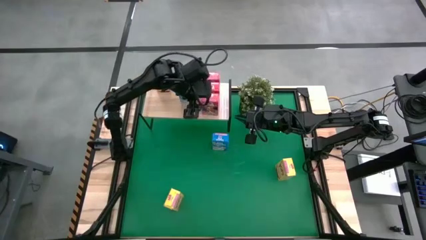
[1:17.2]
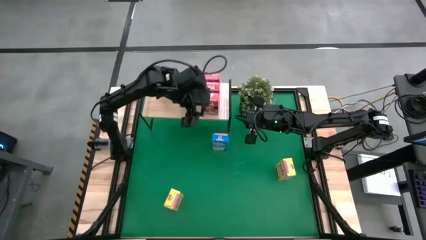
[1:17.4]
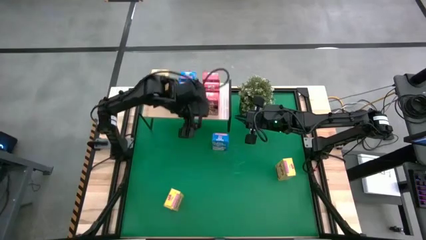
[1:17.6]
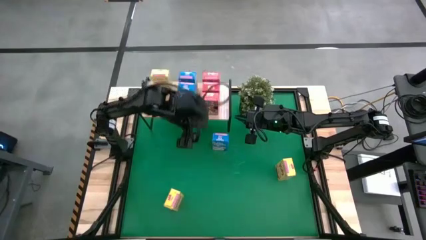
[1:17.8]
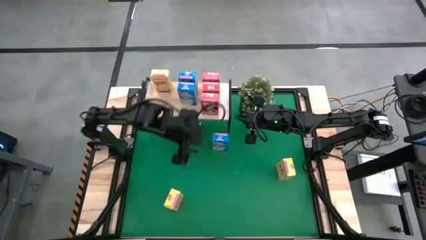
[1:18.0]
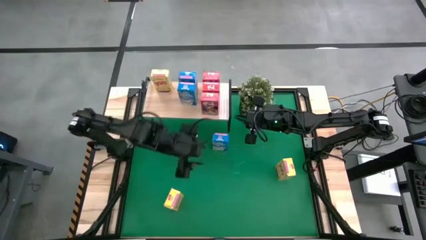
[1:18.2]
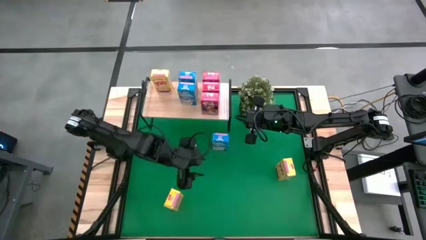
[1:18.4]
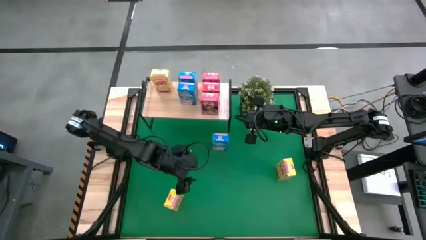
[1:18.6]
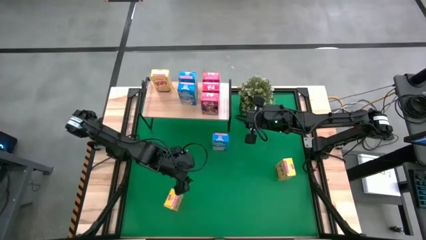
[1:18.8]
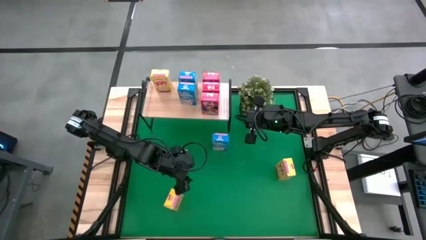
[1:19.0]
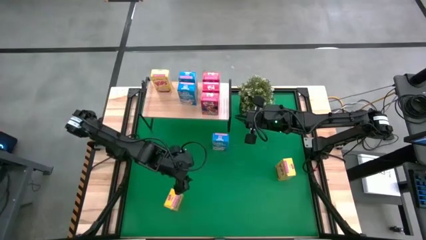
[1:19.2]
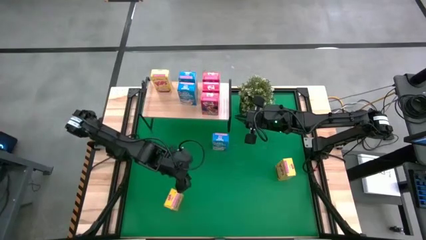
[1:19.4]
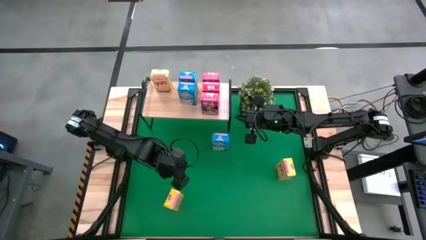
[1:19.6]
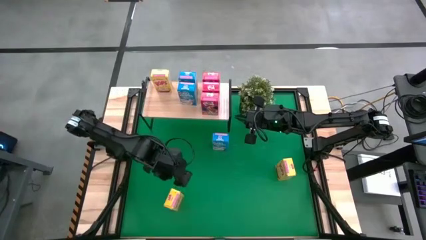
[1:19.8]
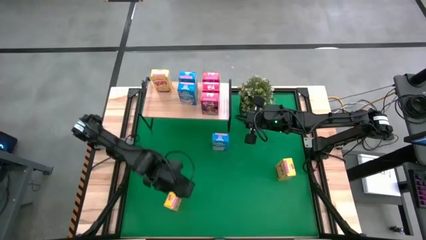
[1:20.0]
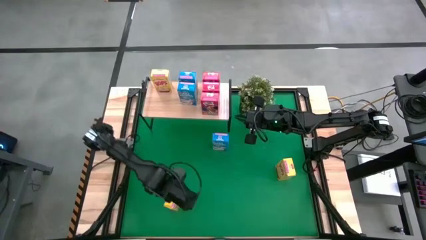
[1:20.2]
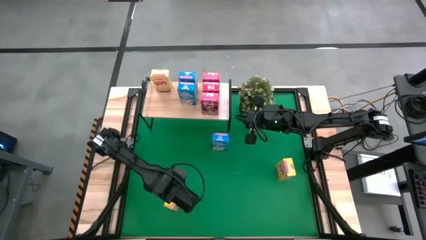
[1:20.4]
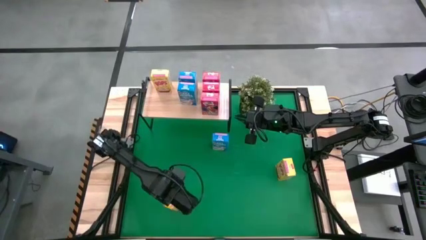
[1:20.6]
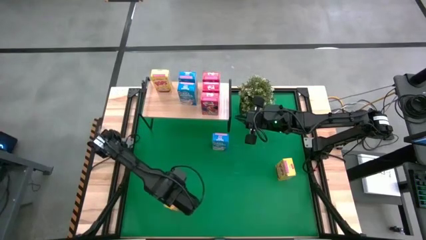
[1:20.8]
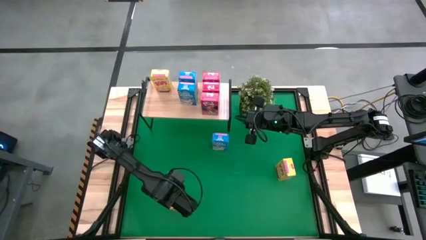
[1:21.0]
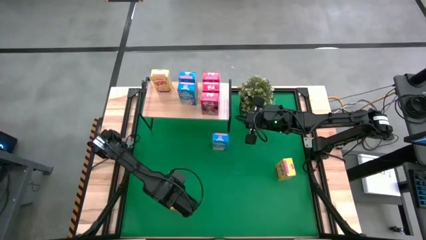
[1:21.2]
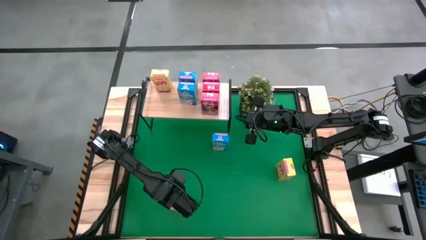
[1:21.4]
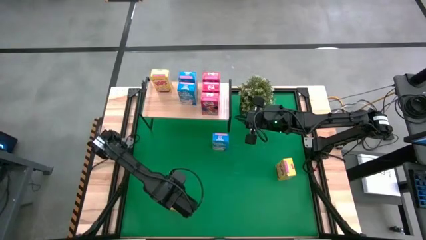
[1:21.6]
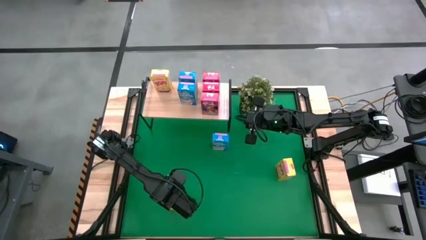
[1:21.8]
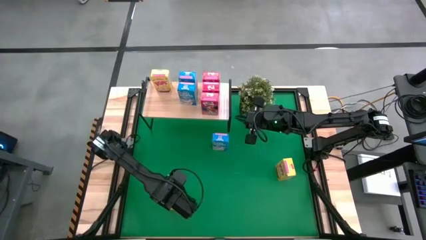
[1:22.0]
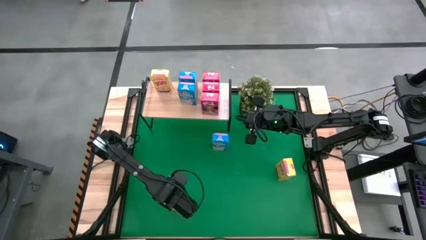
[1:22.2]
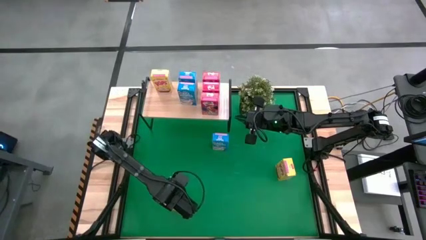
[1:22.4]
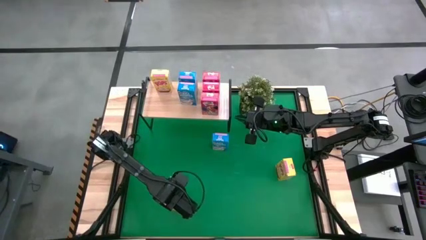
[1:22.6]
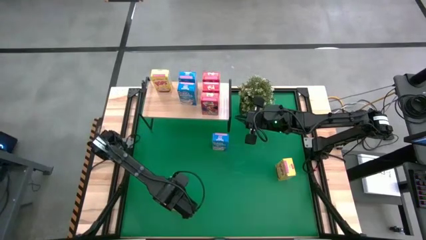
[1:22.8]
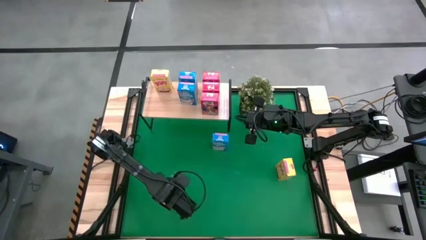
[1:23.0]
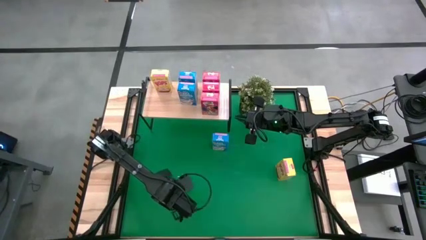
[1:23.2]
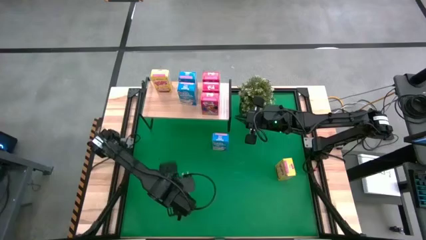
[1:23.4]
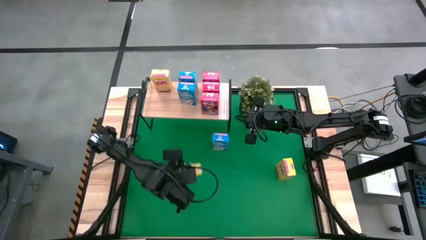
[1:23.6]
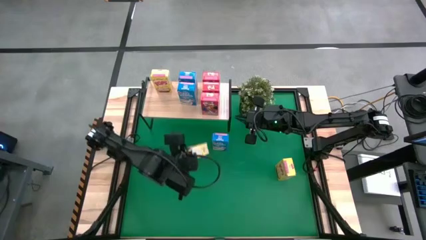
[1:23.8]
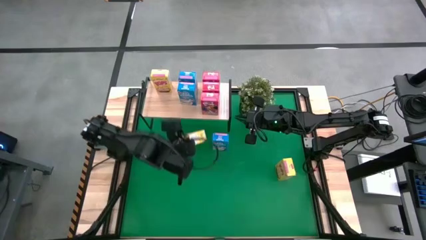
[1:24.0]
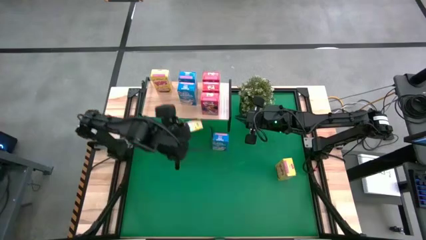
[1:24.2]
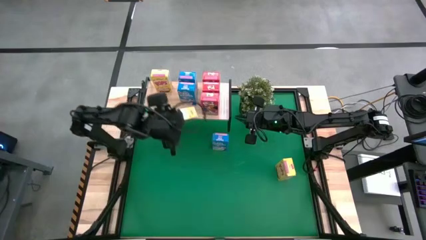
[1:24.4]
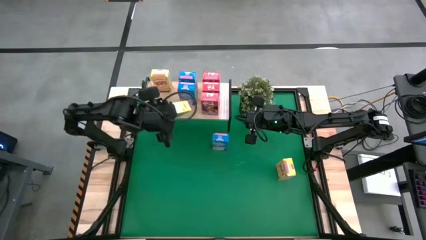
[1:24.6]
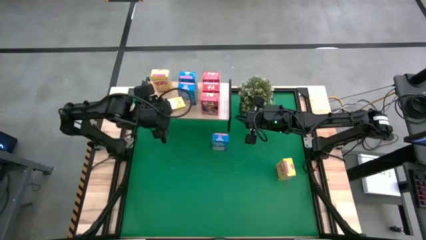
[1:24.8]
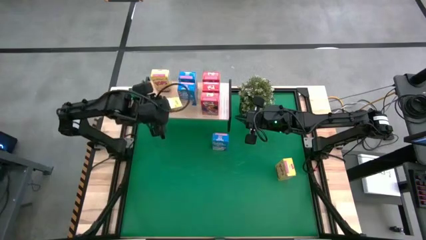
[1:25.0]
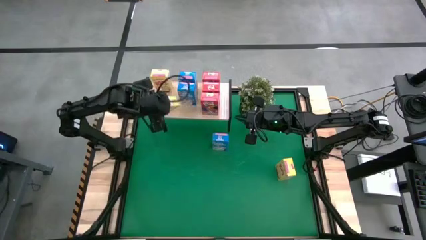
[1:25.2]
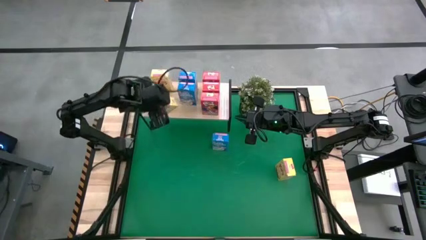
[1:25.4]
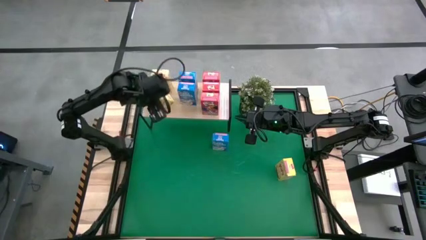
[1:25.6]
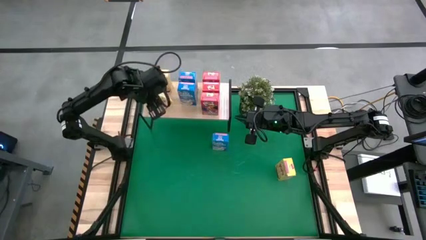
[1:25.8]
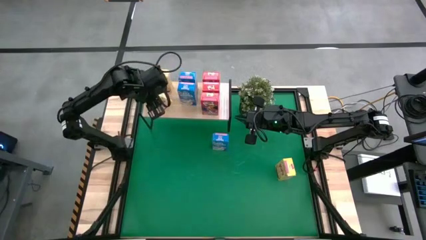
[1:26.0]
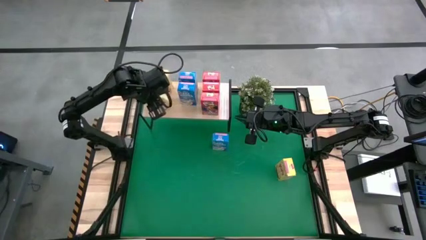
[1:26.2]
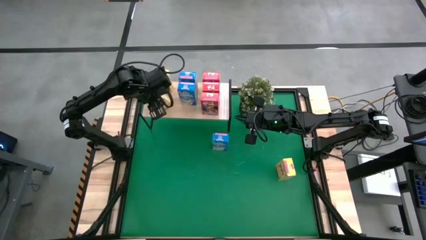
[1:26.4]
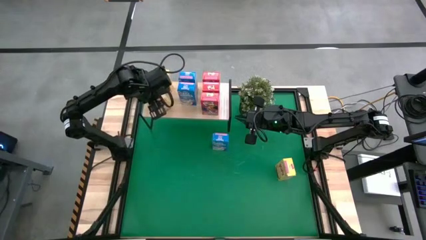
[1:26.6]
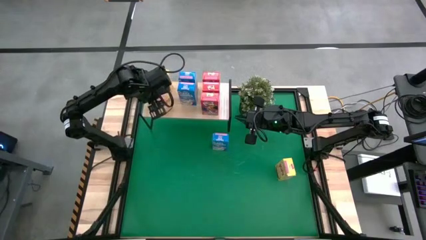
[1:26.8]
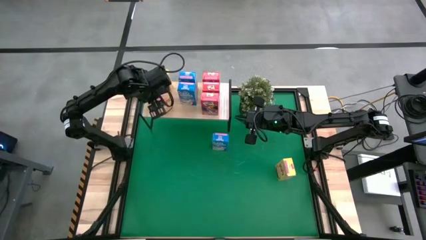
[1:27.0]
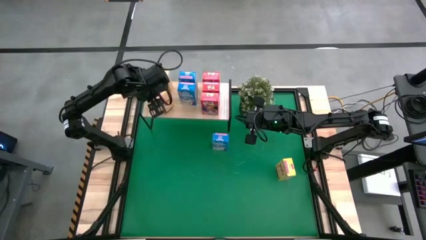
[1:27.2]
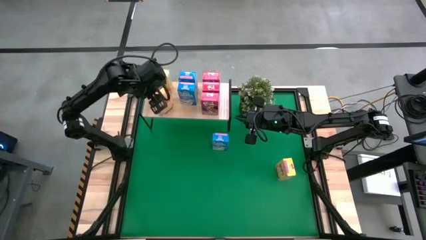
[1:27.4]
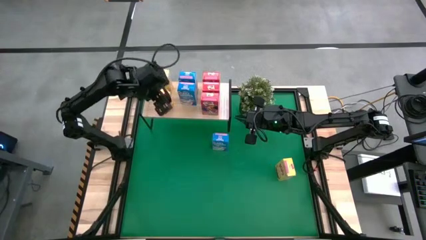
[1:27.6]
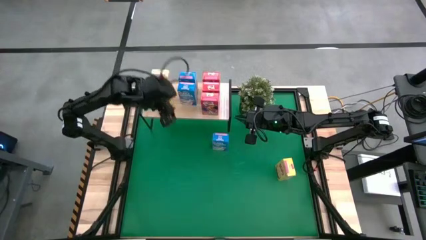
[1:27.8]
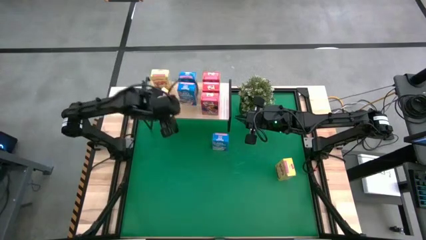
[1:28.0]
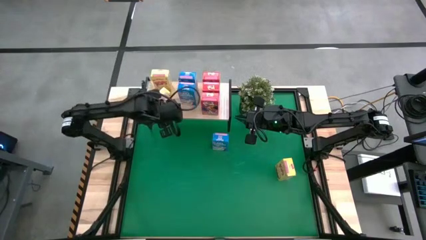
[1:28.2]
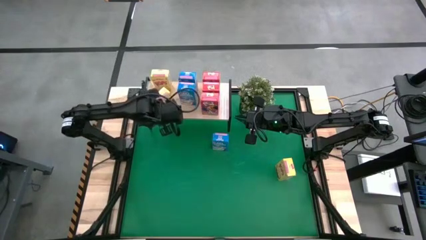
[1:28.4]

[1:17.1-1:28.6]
Task: Stack cereal on shelf
Put the left yellow cereal box on the shelf aligned with the other yellow cereal box

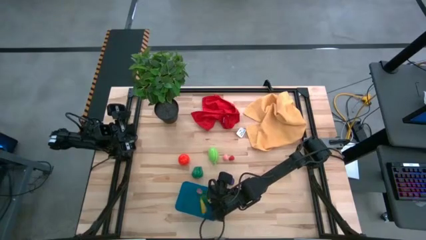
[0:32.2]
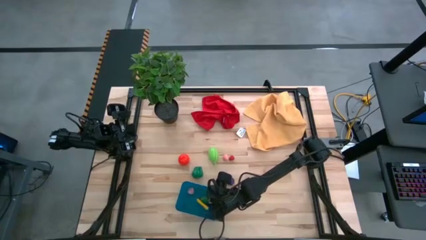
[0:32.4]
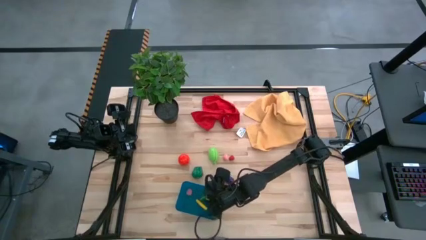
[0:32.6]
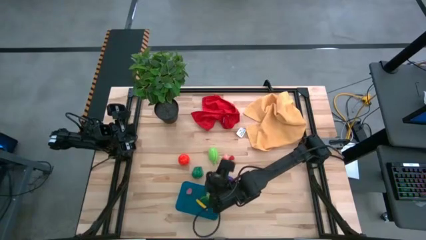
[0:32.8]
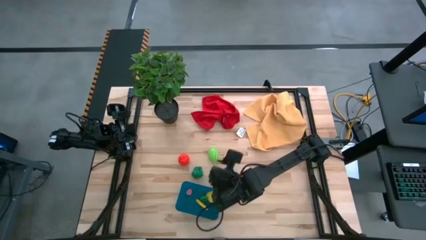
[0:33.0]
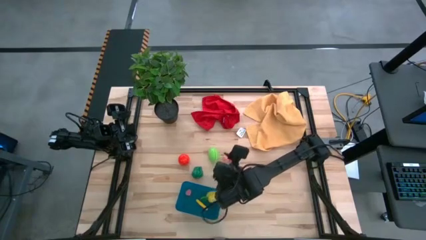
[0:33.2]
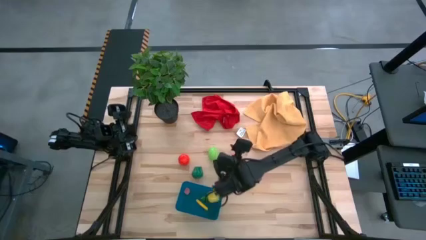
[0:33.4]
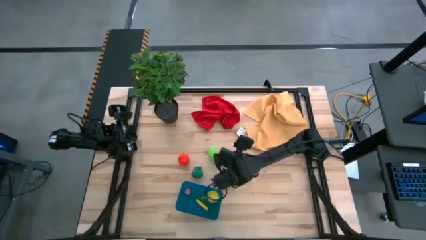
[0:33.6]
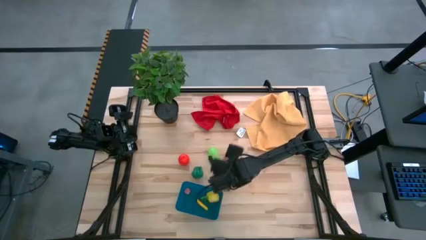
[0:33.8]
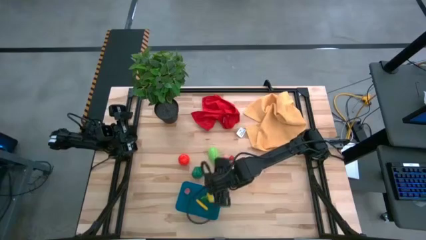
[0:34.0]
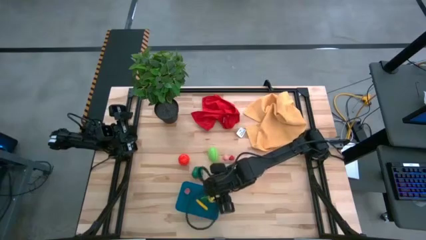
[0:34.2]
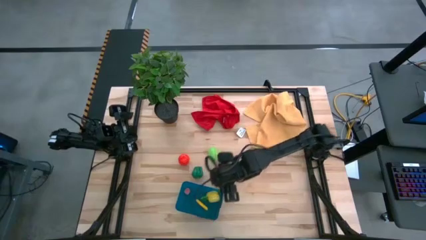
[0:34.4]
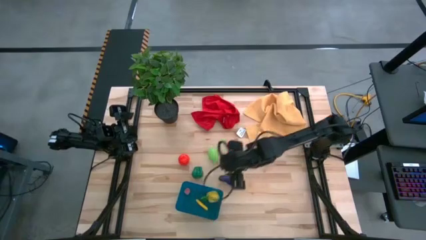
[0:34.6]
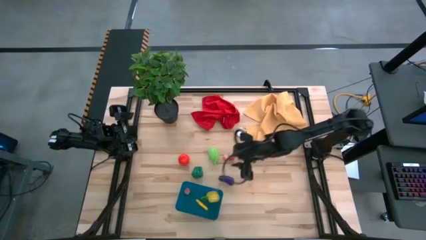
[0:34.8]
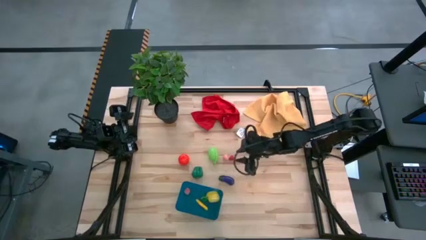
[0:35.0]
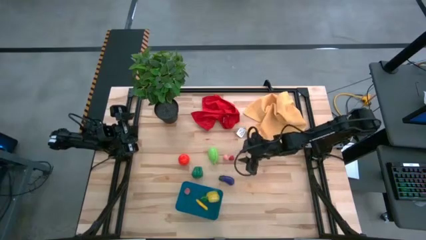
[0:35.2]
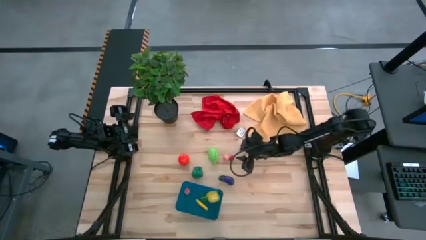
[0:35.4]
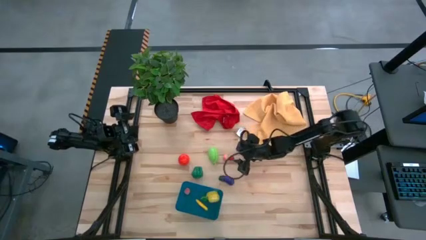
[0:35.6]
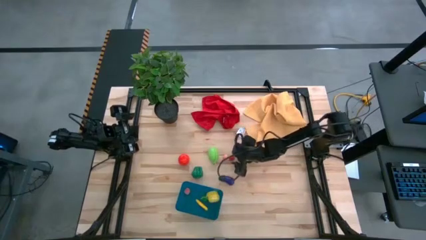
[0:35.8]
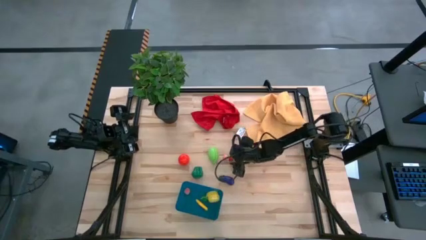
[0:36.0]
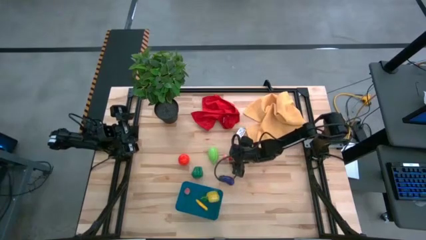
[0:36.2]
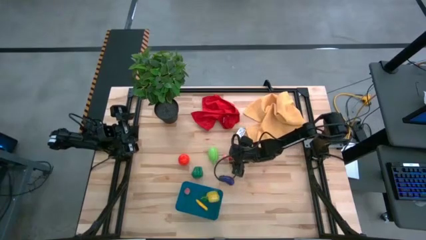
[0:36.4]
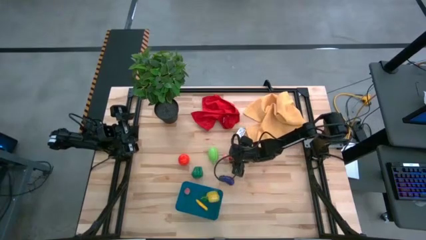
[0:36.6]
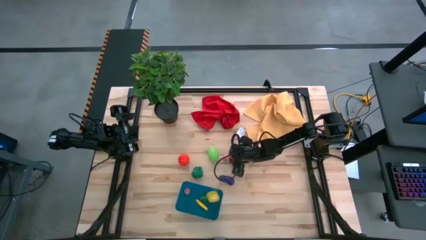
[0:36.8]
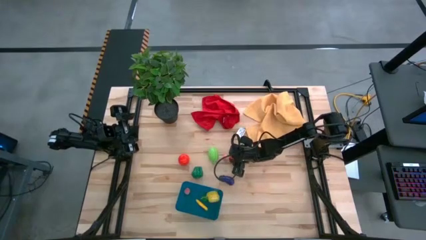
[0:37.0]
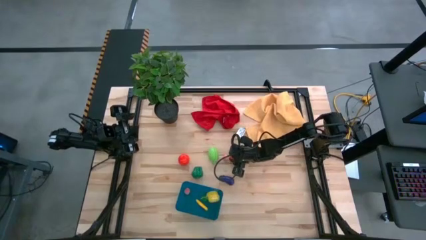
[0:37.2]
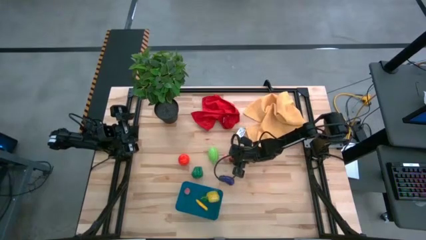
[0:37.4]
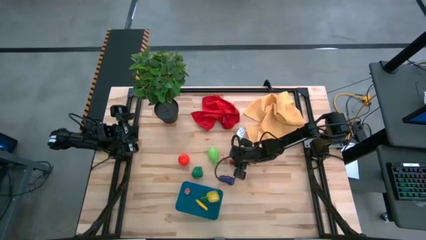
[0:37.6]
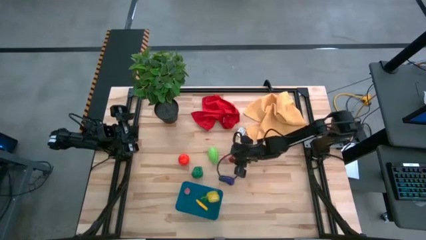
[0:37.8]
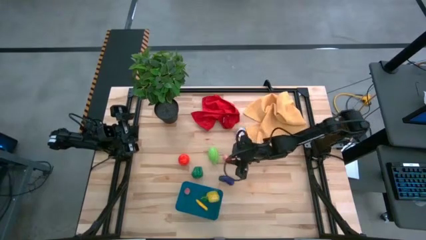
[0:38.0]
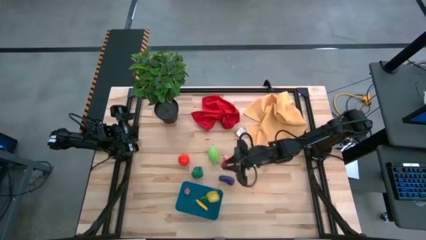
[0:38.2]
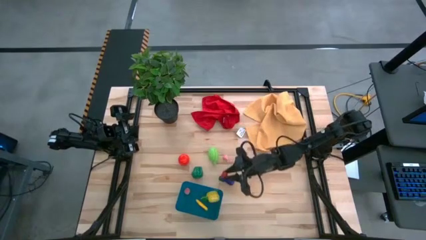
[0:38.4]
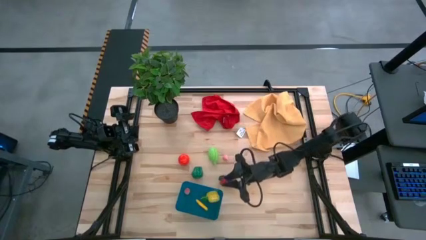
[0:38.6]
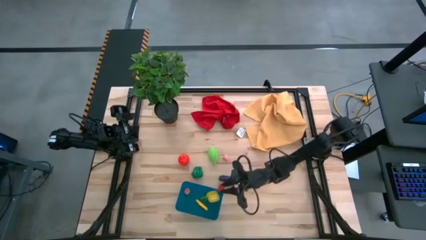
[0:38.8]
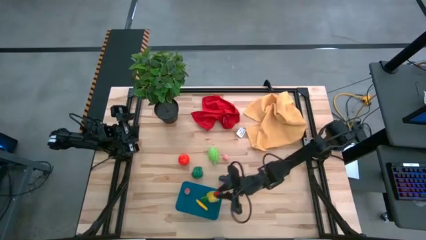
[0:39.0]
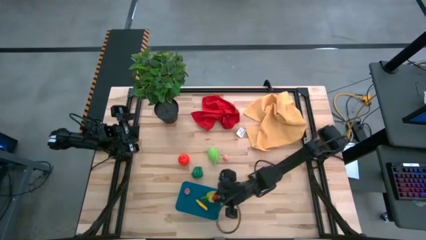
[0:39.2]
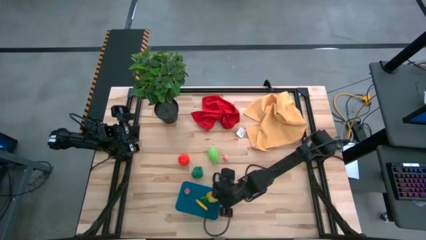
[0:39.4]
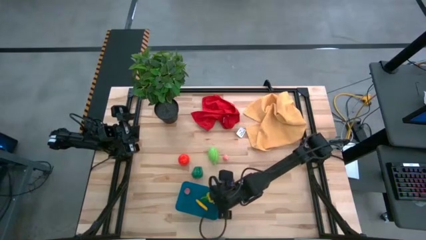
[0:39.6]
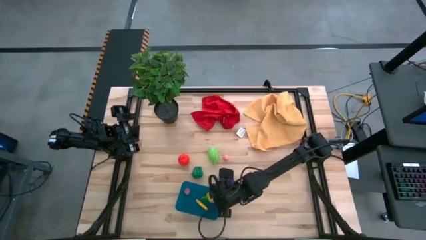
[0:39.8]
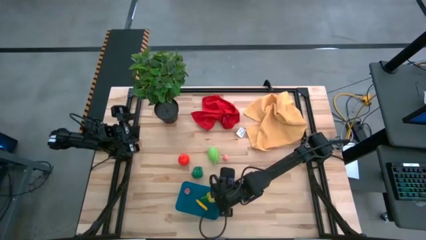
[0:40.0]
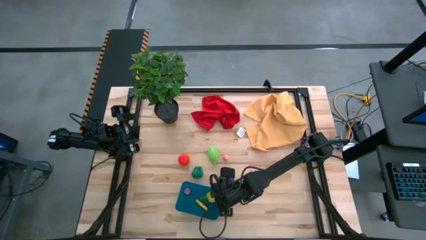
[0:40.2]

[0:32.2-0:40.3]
Task: Pick and placing Produce into tupperware
Put the raspberry into the blue basket
